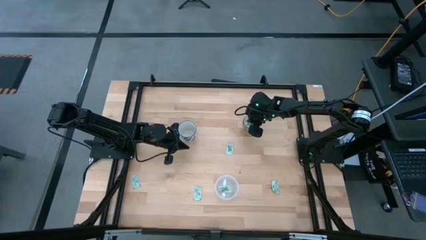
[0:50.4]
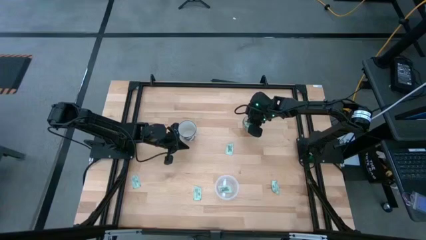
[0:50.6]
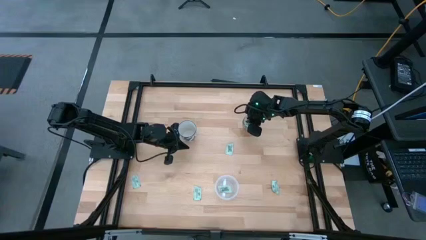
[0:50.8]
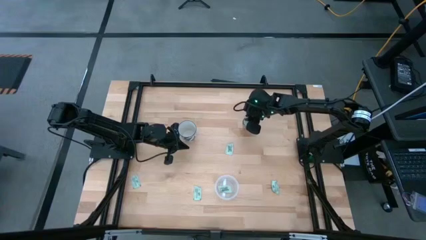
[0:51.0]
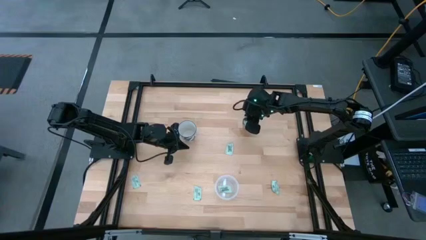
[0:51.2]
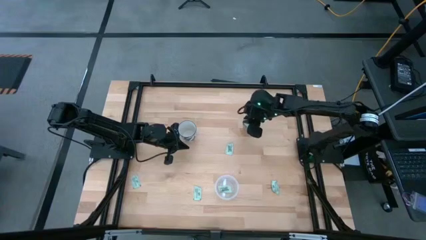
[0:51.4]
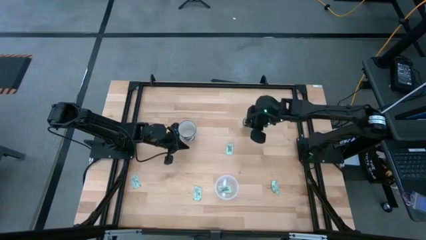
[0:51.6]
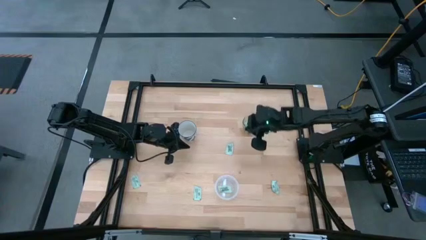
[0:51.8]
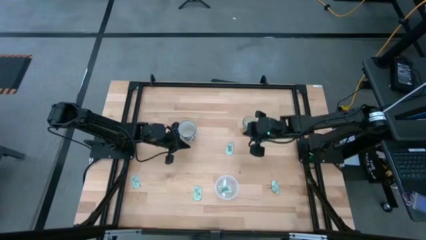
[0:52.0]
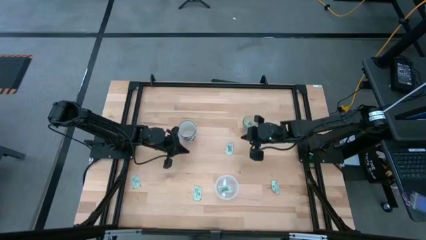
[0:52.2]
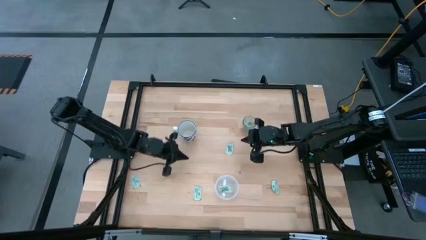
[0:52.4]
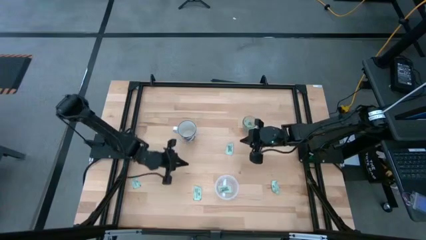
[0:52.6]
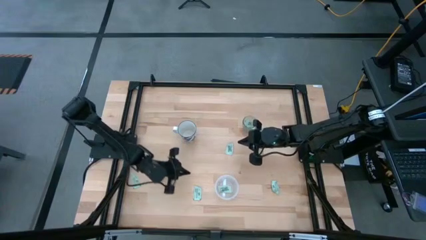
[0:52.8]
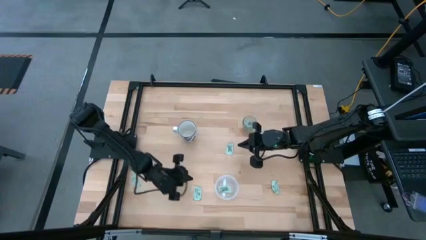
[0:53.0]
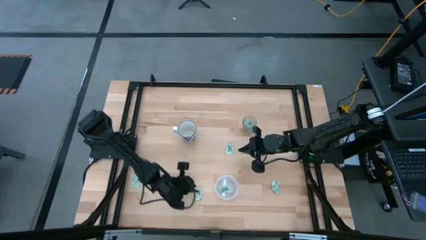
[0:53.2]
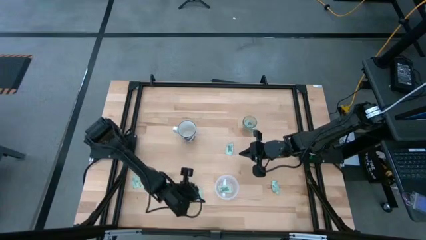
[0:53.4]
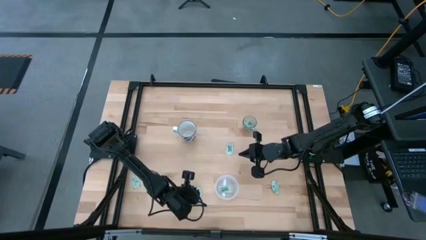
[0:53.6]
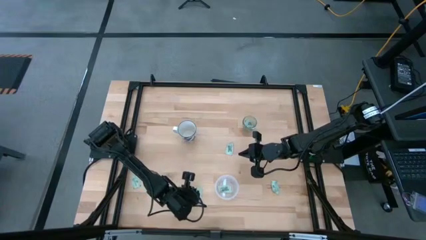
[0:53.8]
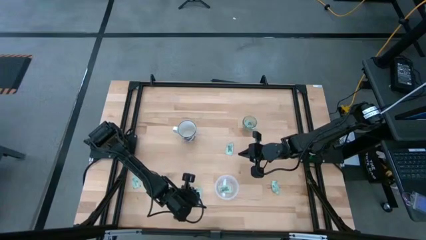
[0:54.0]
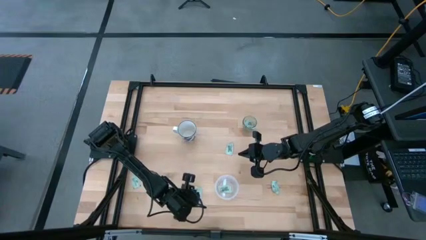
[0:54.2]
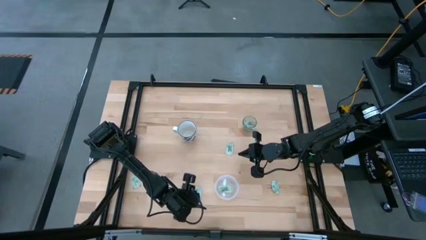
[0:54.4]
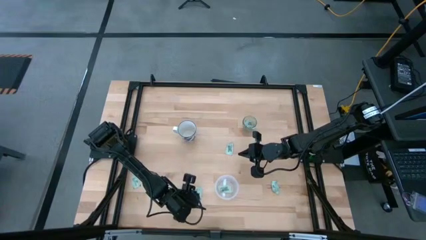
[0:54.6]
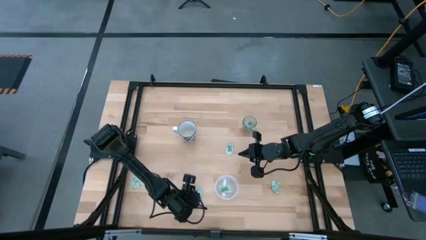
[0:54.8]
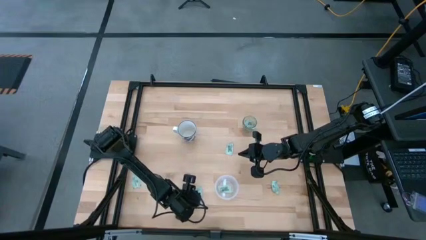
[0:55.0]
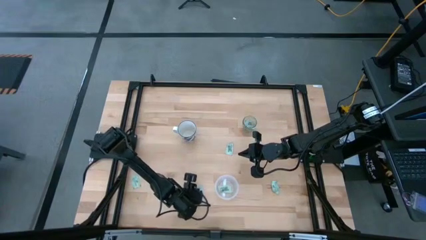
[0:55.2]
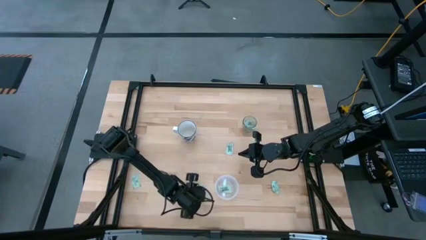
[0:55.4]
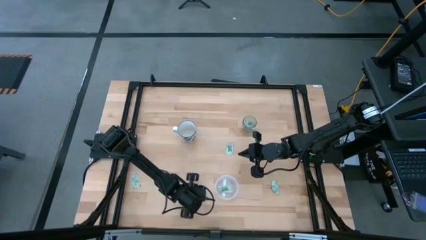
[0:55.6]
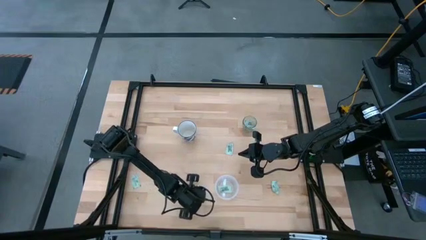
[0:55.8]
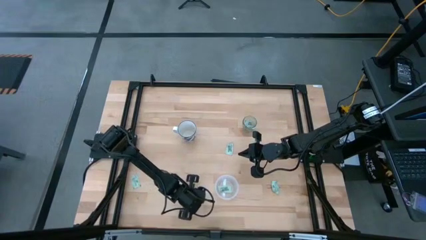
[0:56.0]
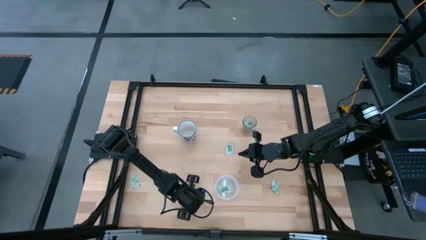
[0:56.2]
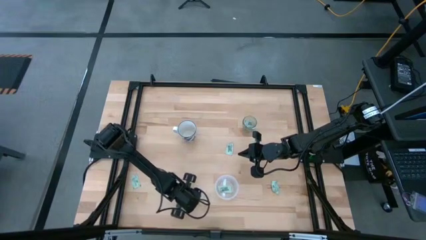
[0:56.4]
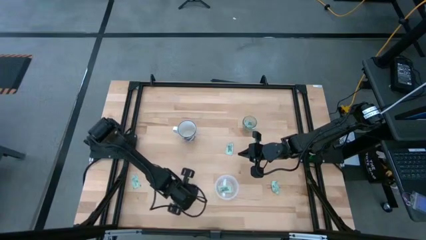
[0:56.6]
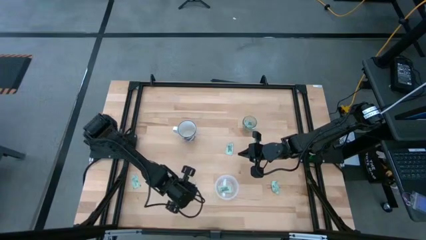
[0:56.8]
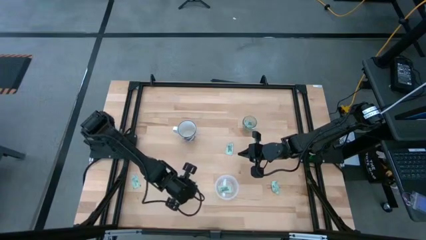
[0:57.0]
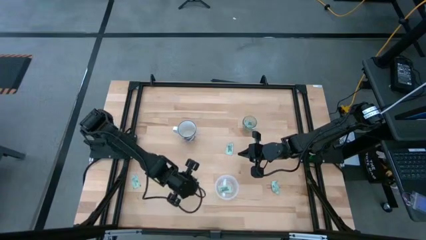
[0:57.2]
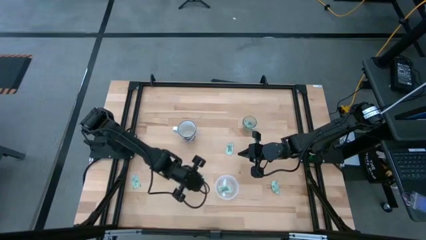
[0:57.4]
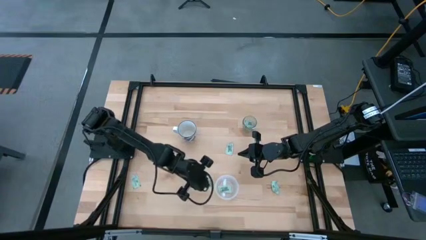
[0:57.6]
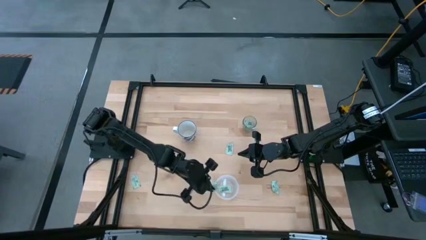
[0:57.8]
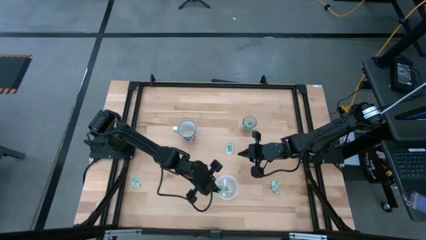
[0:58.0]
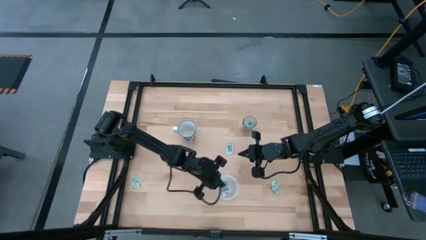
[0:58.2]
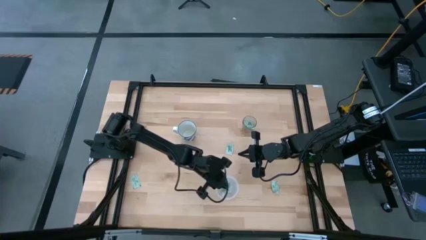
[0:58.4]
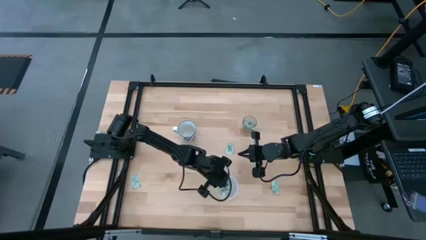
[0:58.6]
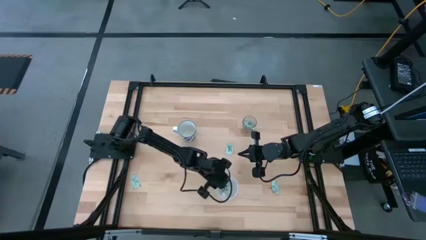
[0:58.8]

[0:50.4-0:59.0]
Task: Pick and place Stevia / Truvia into bins
Put the white stevia packet into the transparent container

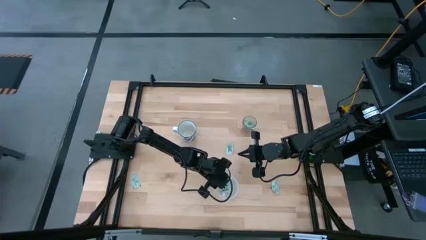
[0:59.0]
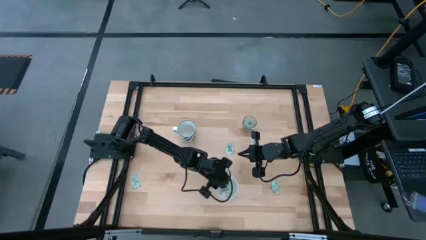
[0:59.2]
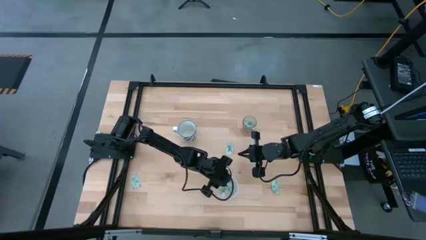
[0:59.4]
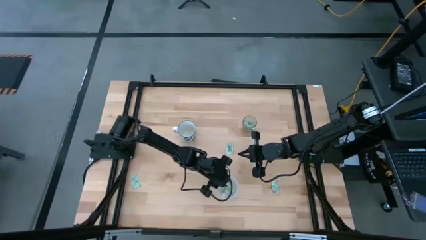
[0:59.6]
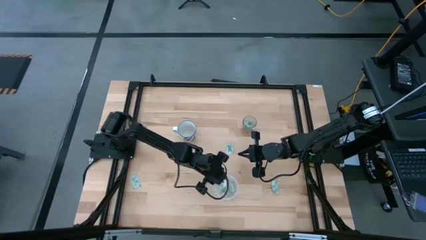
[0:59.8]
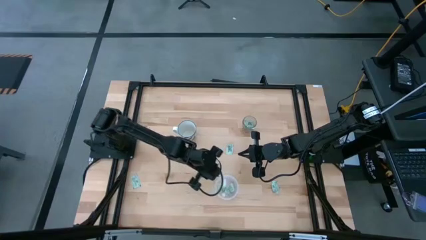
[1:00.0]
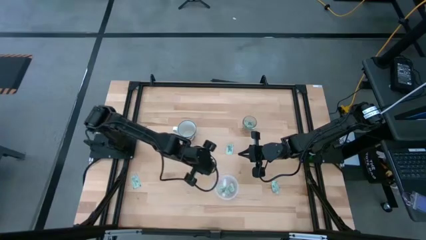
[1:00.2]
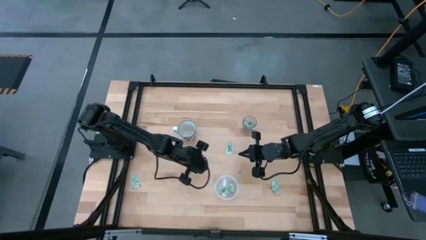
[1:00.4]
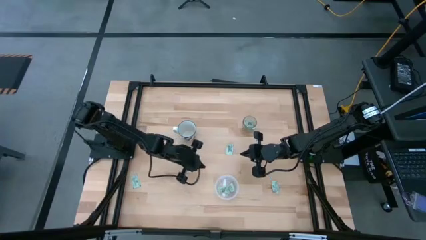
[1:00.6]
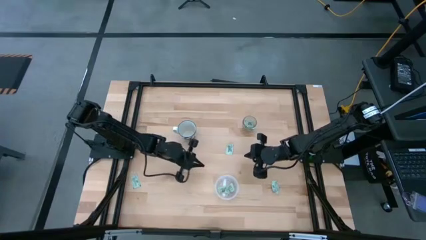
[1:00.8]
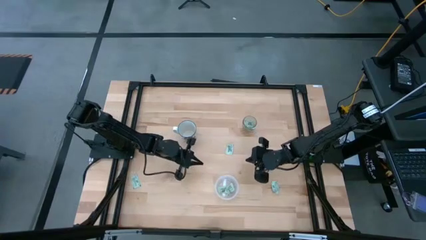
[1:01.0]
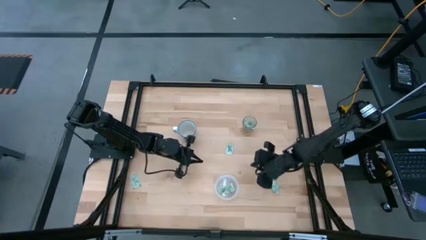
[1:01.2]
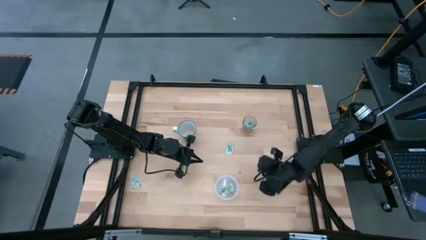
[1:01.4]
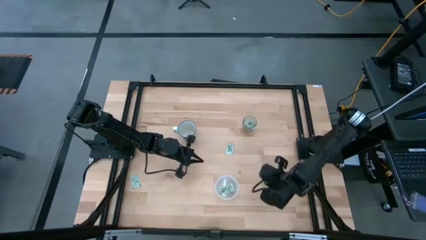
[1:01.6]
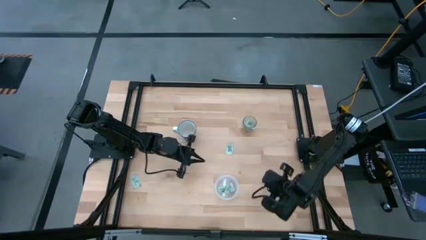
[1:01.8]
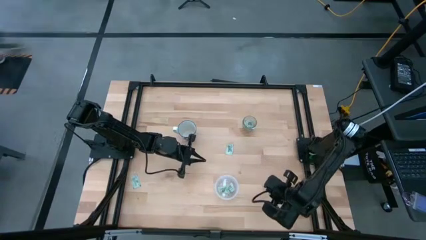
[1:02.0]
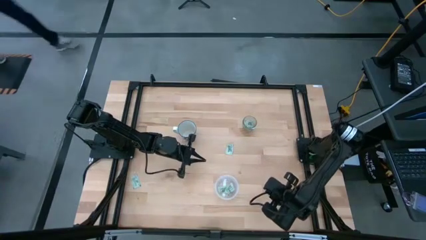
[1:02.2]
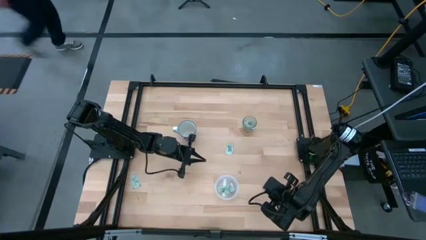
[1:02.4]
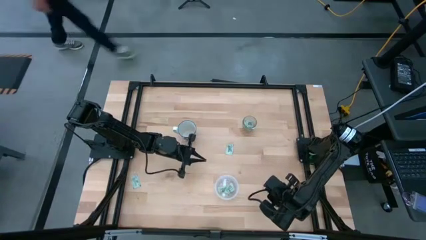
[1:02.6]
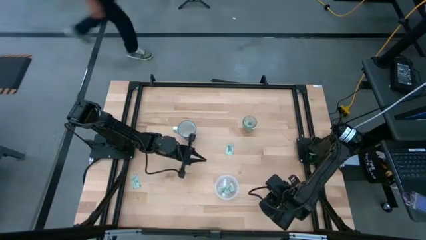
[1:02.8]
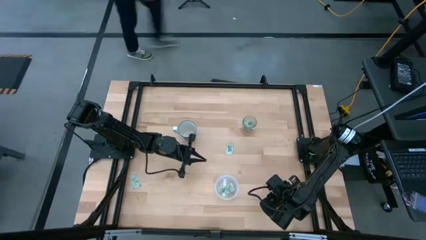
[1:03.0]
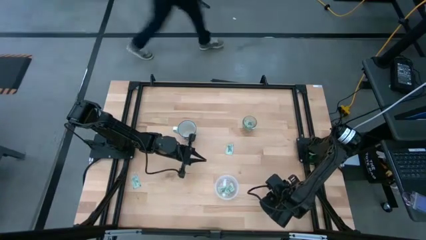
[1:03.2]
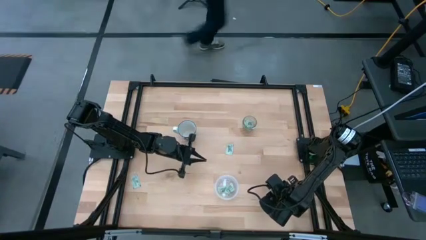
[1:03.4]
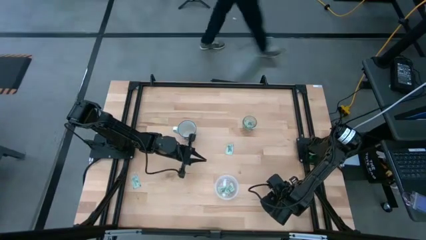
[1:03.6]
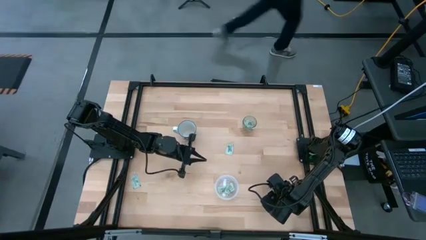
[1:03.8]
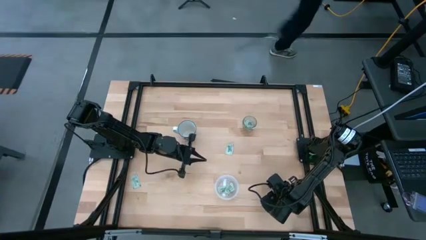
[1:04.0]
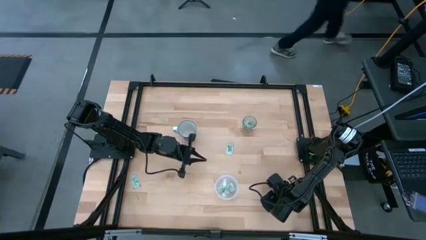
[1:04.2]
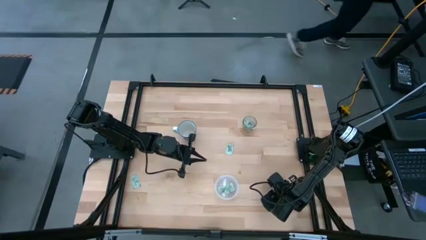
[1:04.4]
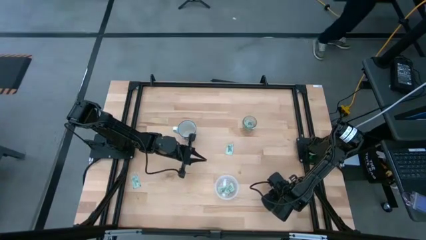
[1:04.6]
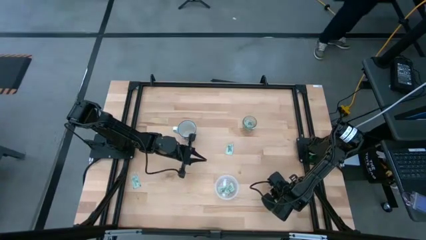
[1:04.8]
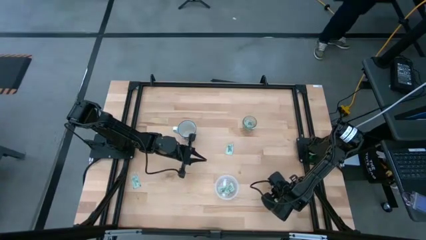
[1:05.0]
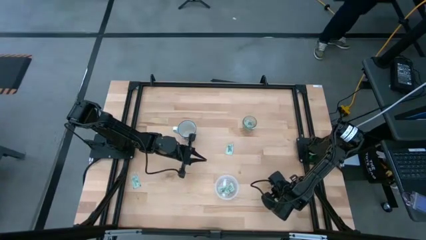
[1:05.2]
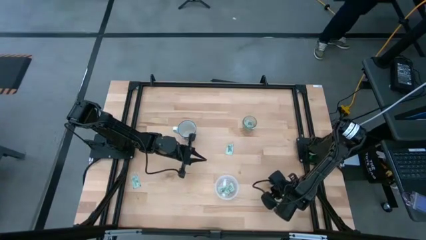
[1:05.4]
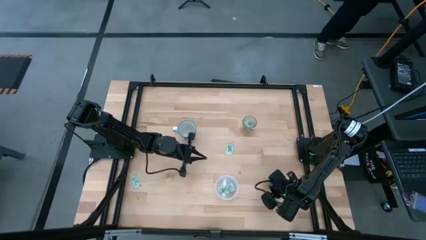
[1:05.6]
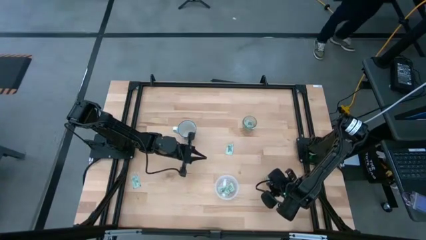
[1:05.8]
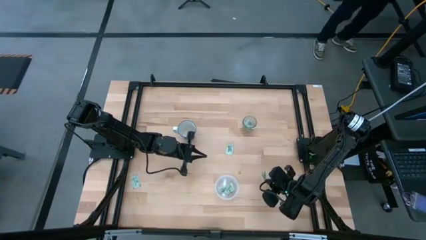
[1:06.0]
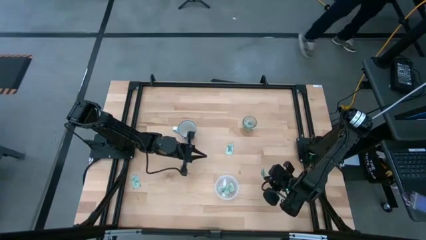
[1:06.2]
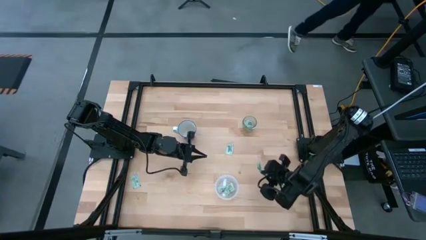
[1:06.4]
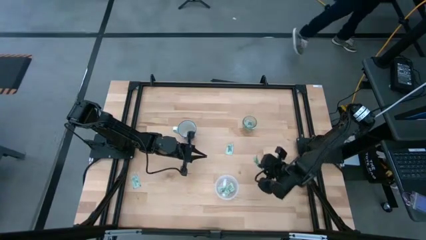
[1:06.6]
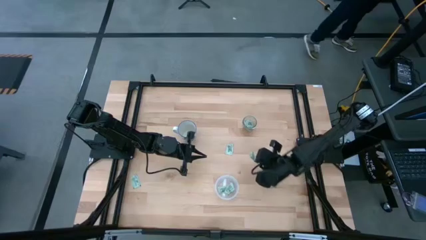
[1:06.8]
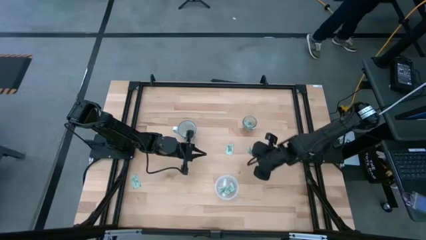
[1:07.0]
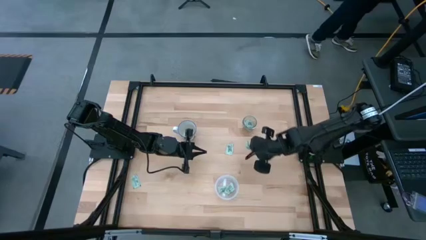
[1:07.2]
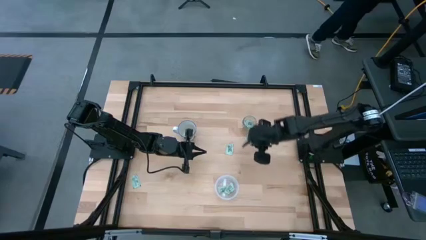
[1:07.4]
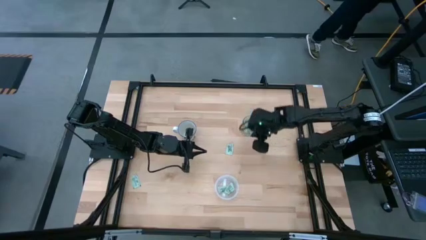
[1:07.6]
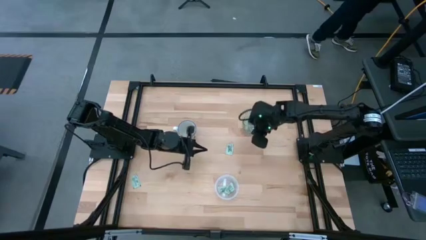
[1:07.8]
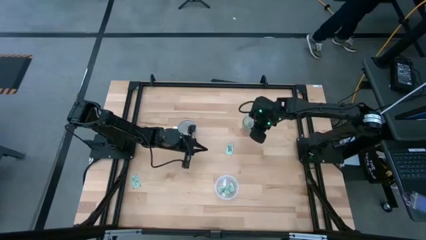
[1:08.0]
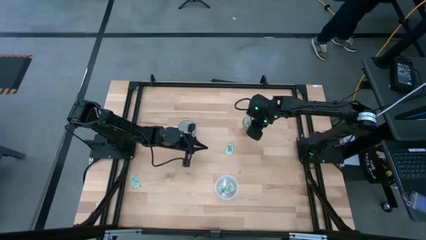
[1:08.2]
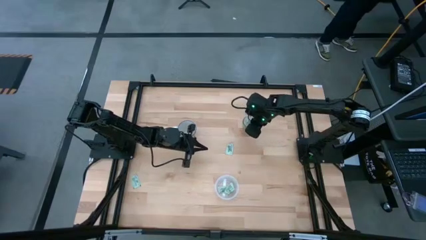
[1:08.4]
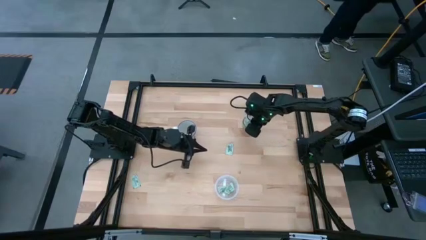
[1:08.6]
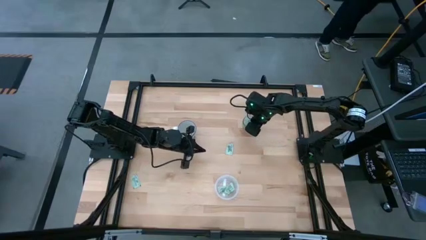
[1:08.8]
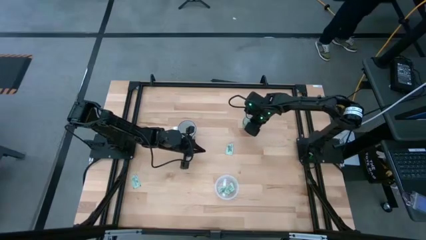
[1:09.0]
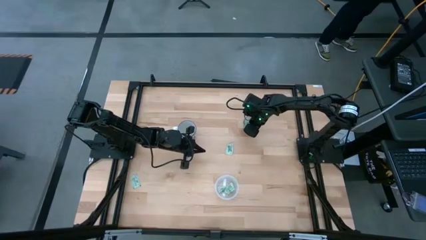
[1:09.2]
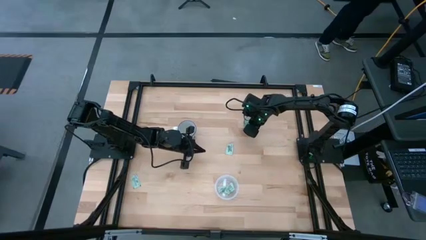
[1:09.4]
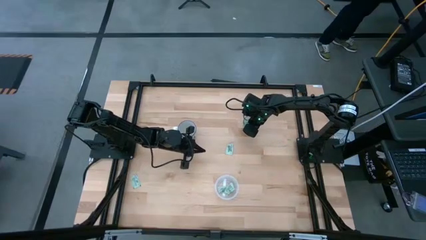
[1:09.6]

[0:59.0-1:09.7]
Put the white stevia packet into the transparent glass cup
